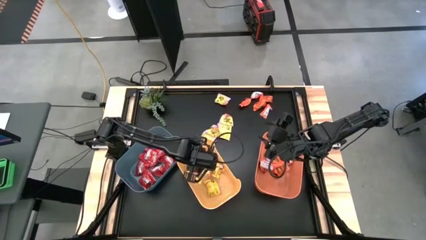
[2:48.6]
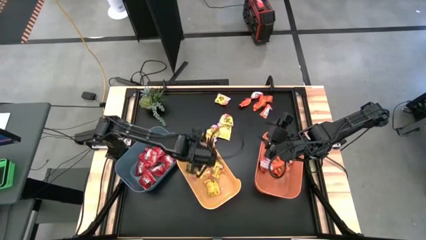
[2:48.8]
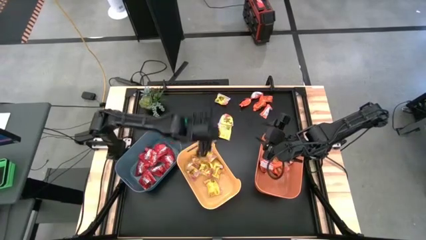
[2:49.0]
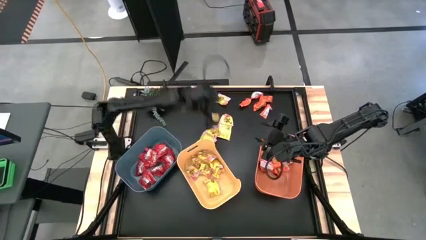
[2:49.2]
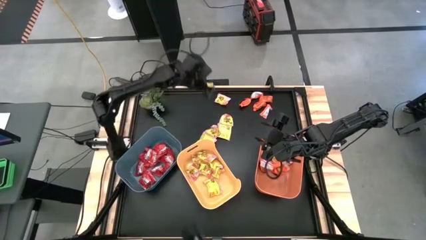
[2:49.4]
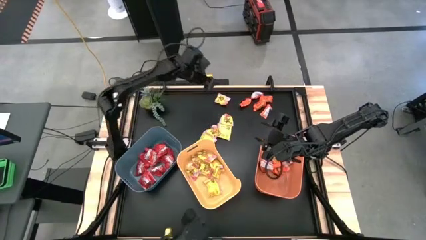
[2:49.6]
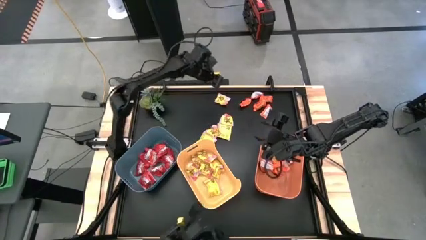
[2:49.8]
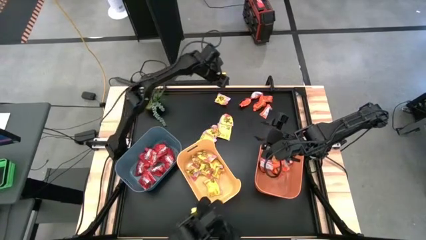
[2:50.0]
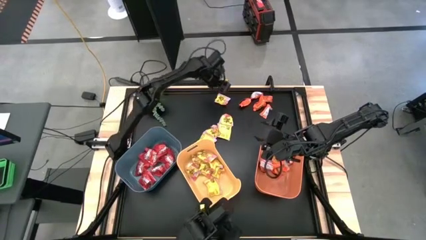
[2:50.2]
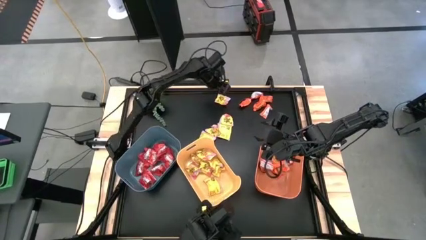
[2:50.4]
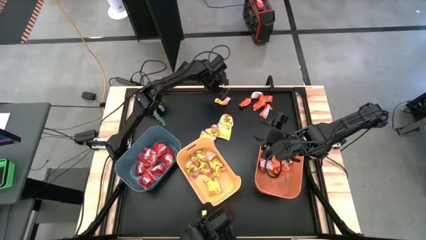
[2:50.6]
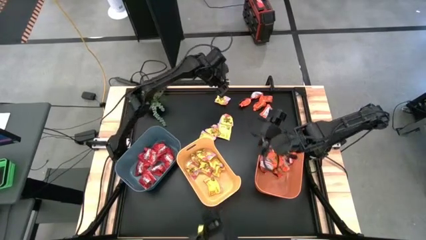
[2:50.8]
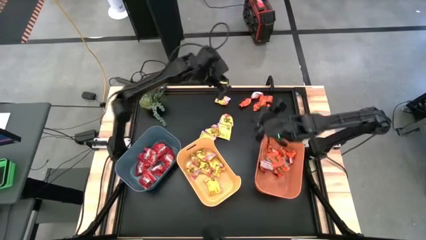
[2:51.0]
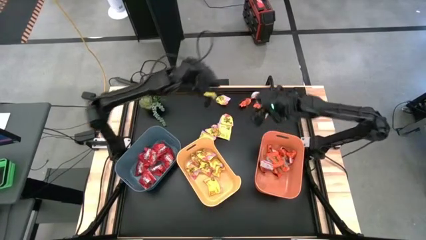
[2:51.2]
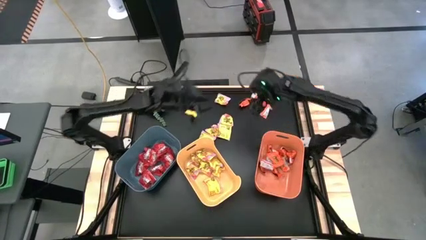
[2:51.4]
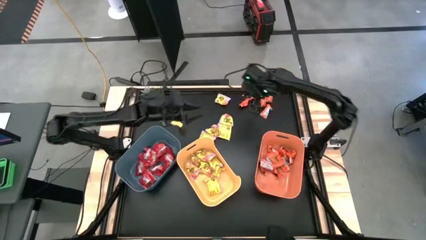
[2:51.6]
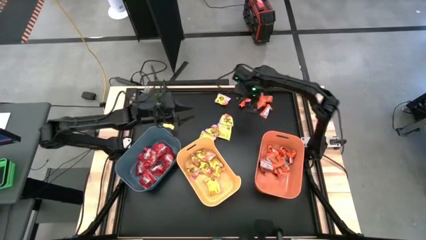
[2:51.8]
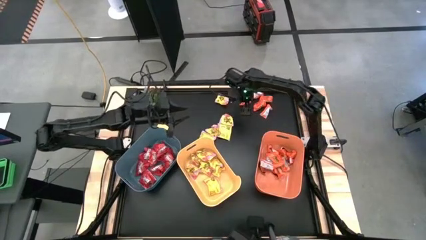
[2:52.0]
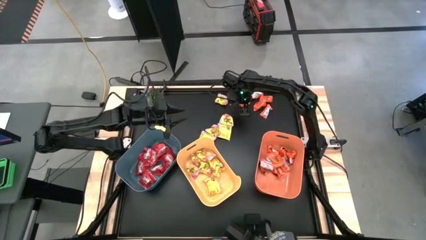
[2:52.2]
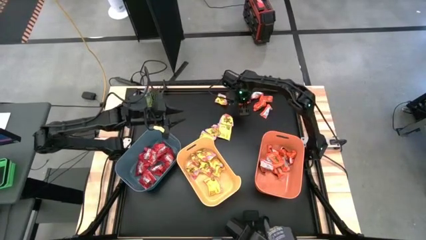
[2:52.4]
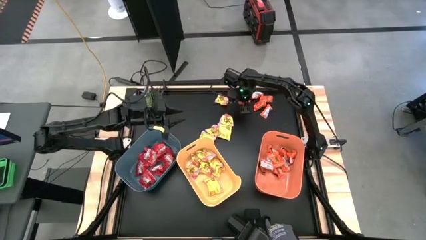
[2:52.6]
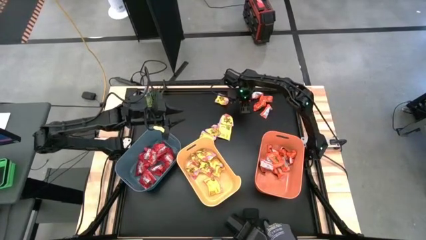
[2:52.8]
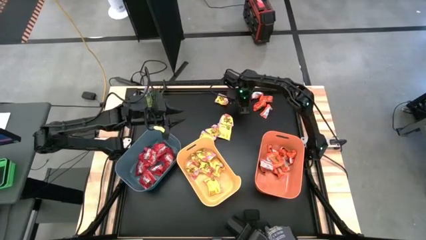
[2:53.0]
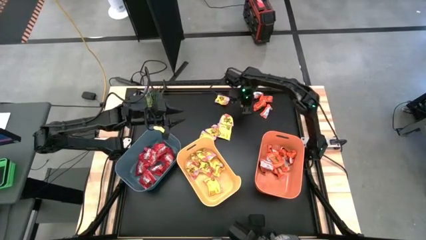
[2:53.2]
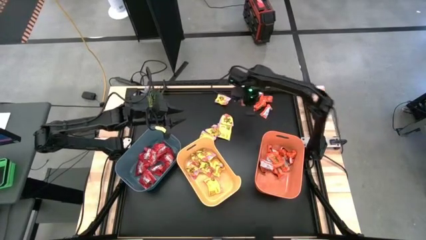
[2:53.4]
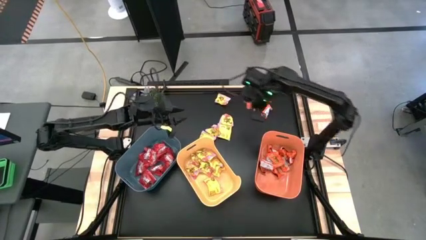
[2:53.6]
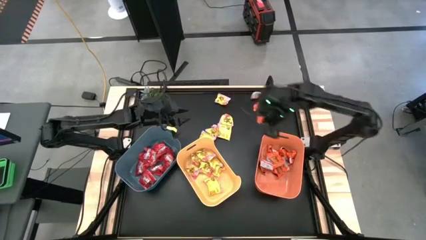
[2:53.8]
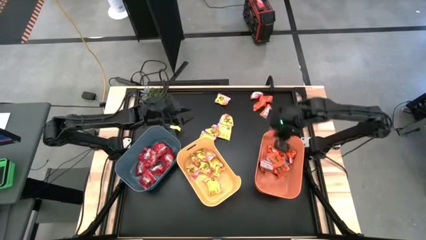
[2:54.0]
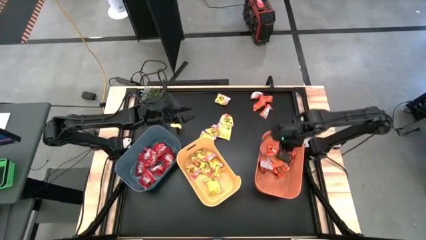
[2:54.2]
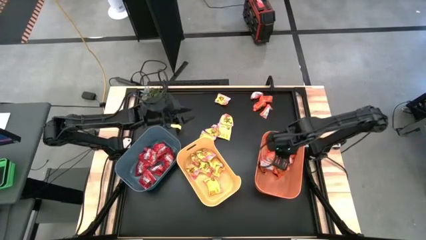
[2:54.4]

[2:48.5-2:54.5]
Task: Sort candy
Put the orange chocolate into the orange bin

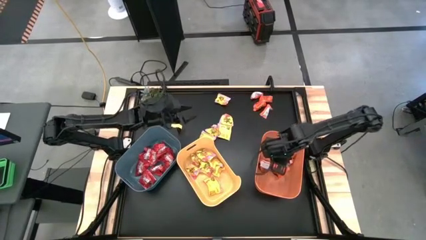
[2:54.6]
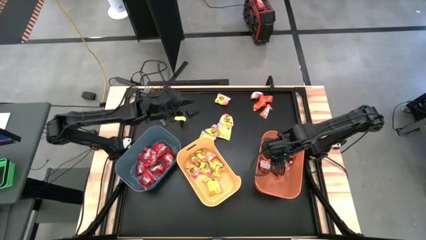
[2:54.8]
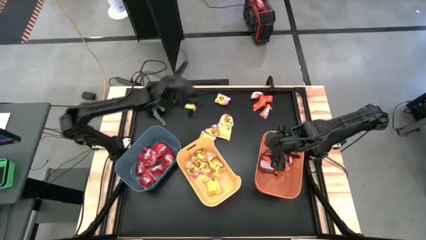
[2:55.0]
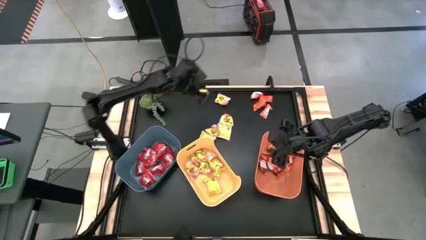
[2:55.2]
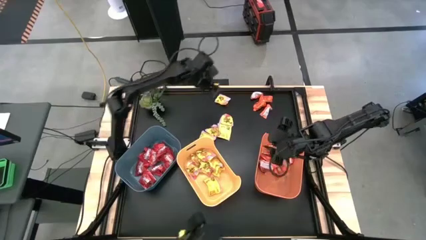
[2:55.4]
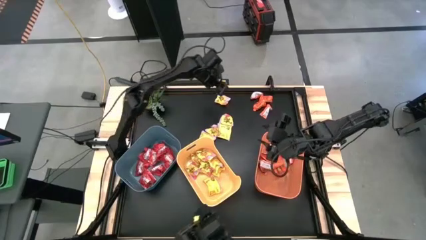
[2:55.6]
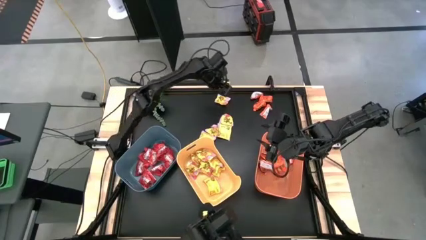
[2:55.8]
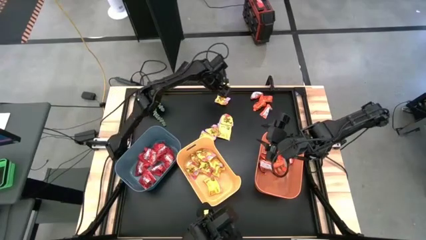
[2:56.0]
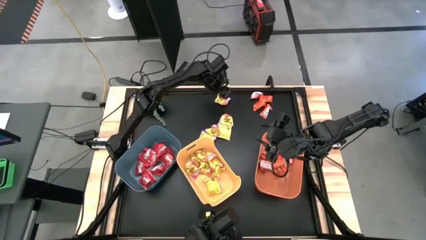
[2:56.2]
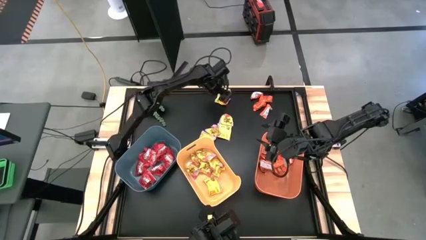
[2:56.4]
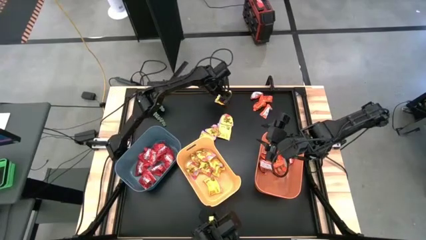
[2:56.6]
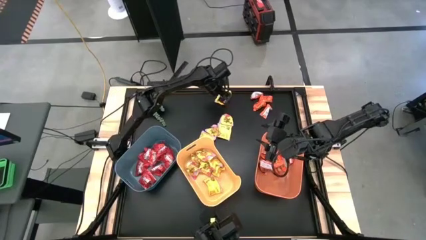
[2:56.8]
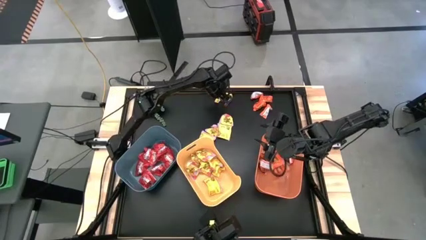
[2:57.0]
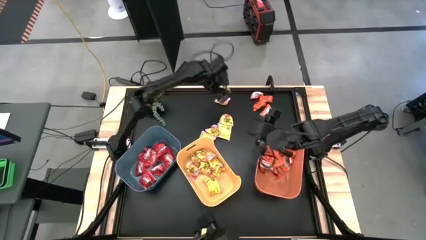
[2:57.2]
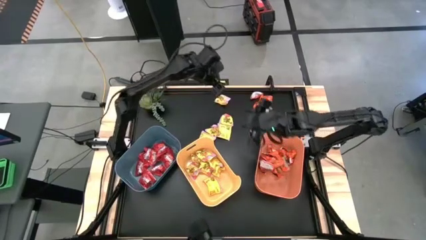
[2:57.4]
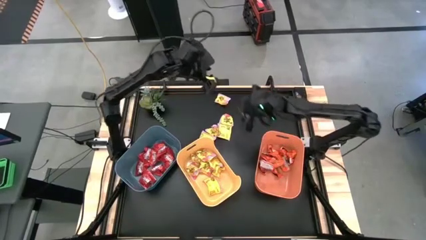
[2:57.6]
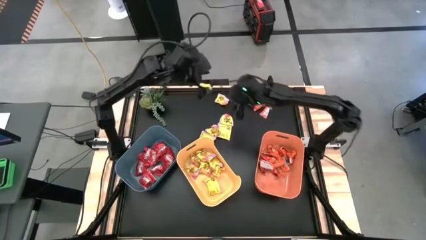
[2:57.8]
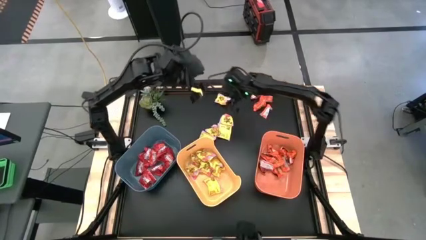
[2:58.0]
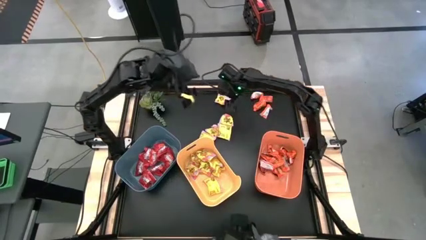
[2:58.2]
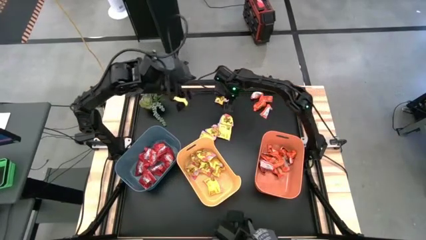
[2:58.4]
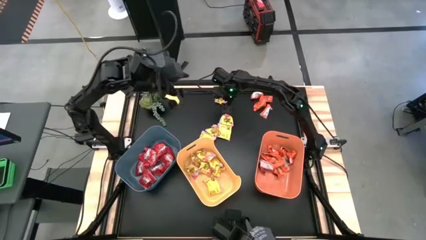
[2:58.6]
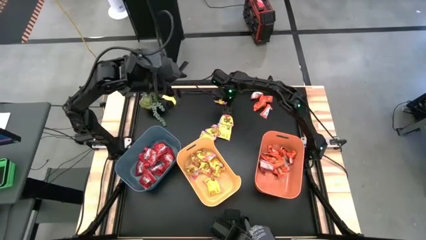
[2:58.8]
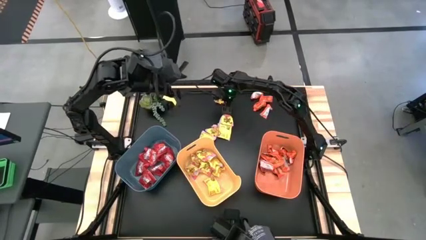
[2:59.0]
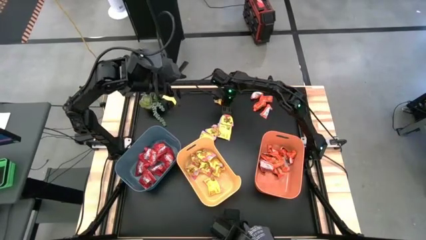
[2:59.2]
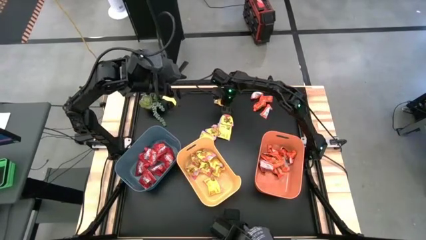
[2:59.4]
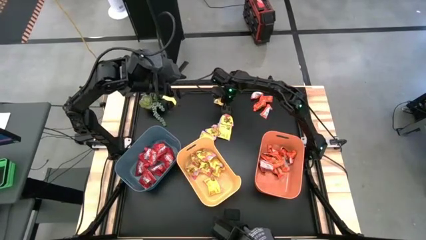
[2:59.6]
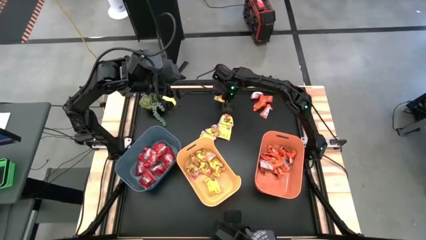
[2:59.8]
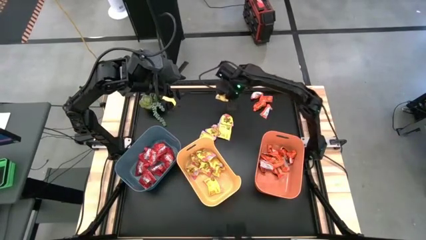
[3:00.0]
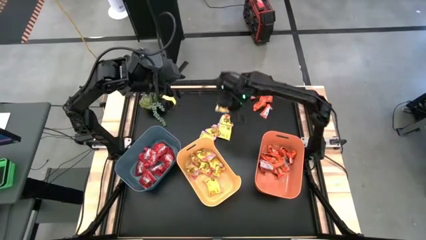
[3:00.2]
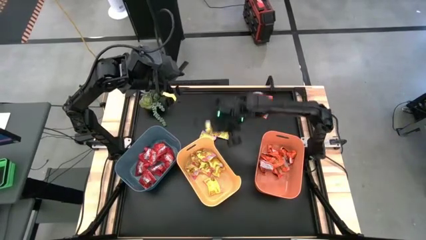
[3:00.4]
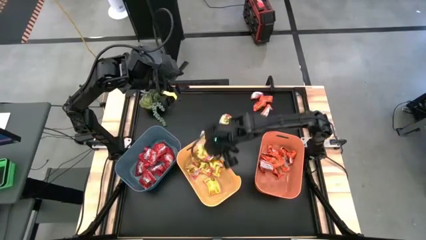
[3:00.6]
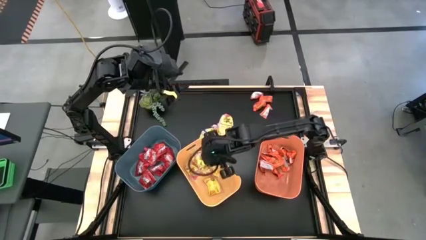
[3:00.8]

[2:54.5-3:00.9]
Put the yellow candy into the yellow bin

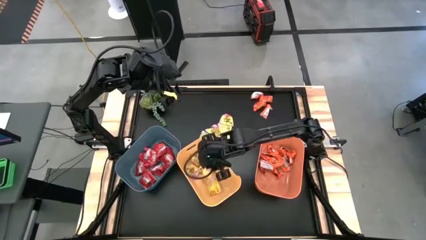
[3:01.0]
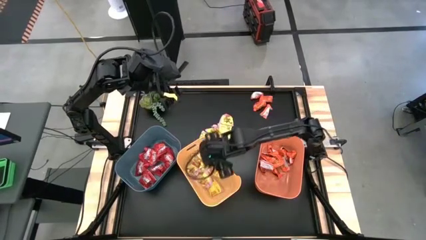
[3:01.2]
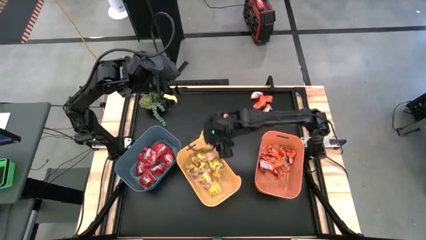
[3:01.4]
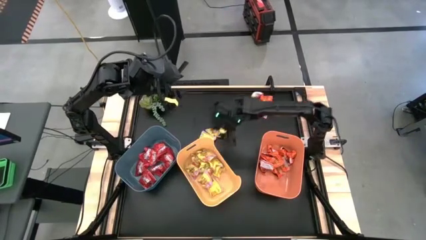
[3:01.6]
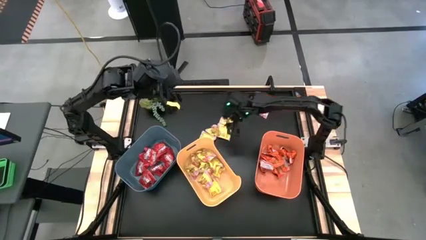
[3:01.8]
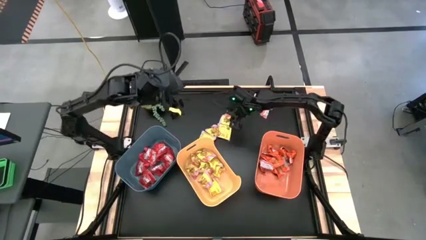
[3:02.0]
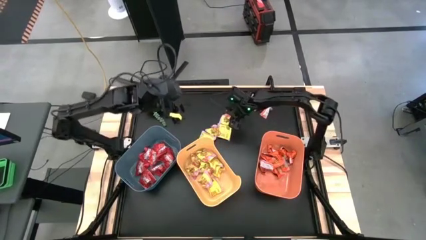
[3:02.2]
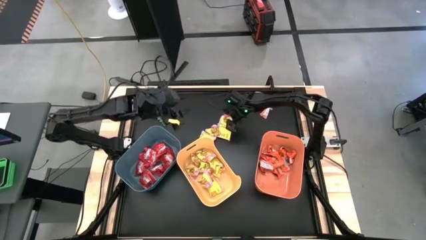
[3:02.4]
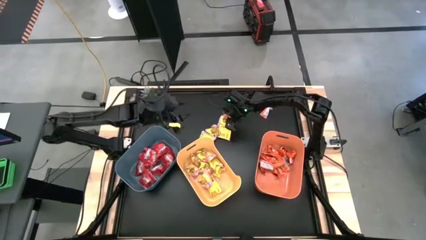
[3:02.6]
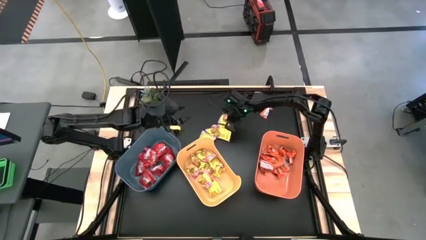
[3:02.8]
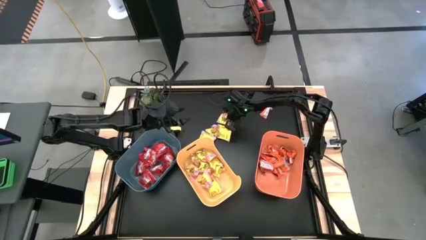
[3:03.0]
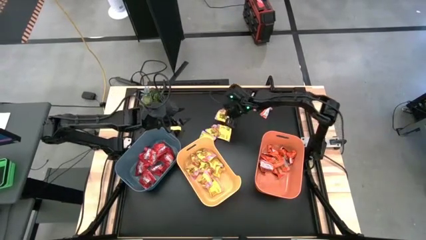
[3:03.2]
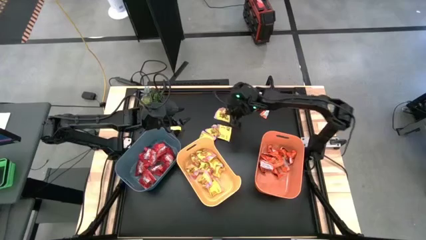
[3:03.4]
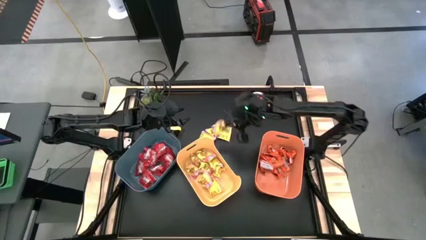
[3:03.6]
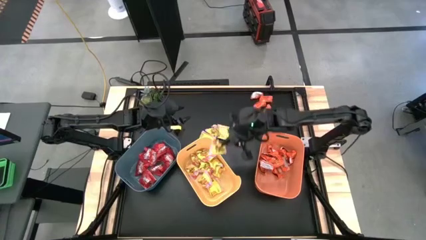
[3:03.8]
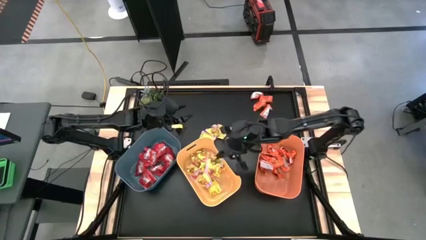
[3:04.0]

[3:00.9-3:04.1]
Put the yellow candy into the yellow bin

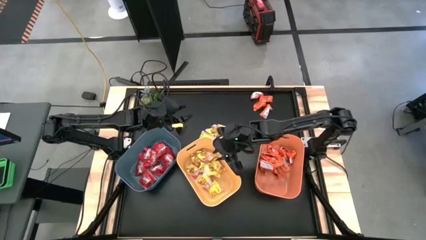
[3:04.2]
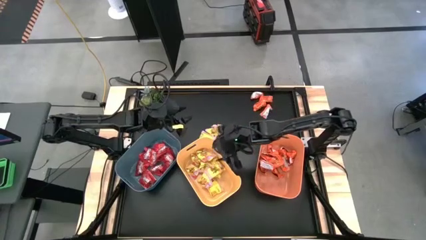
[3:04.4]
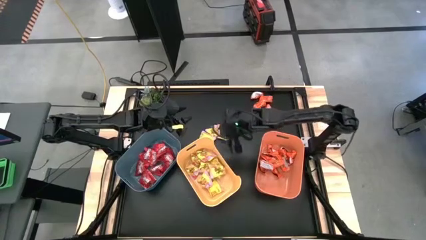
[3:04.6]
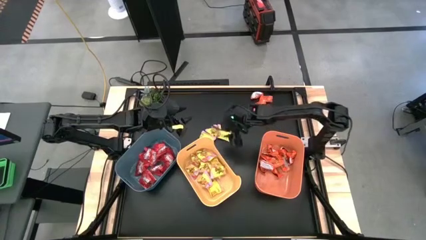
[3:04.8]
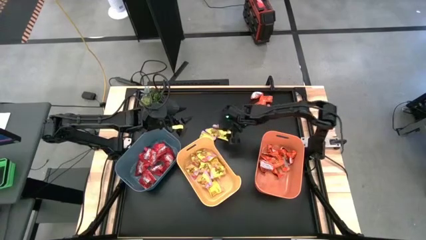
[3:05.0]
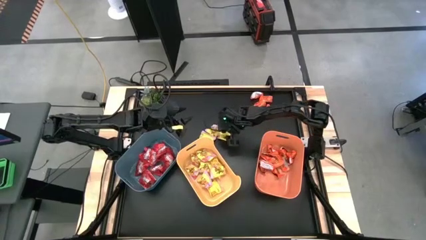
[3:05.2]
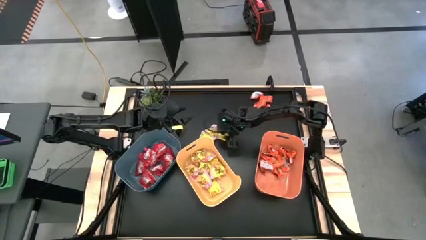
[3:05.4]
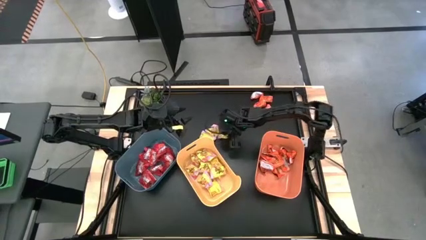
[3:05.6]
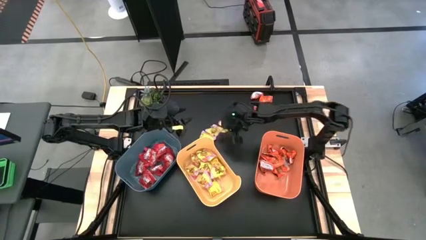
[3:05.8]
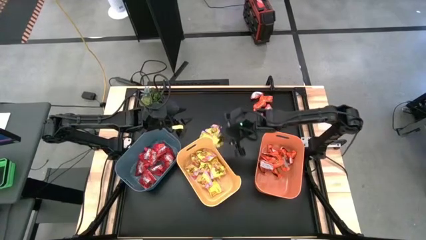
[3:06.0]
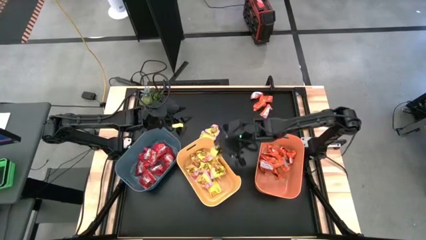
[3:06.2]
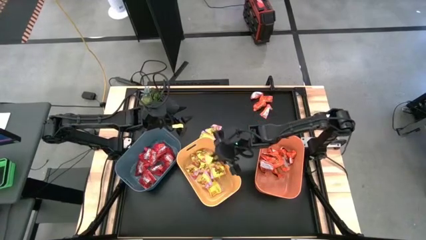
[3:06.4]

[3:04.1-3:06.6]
Put the yellow candy into the yellow bin
